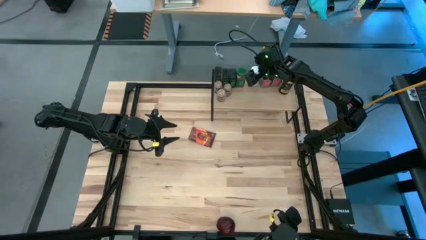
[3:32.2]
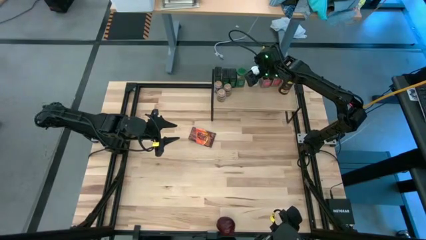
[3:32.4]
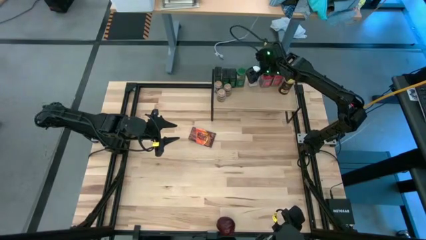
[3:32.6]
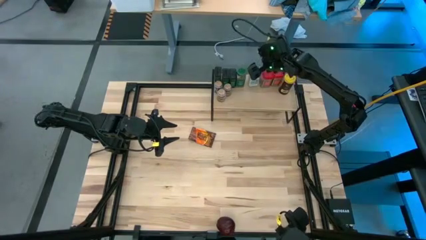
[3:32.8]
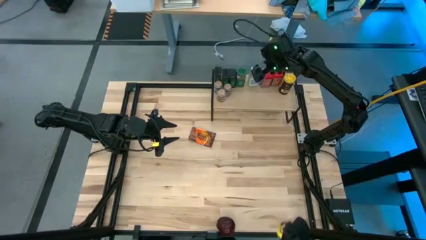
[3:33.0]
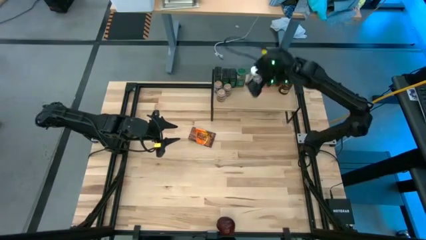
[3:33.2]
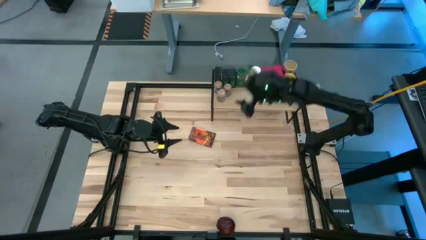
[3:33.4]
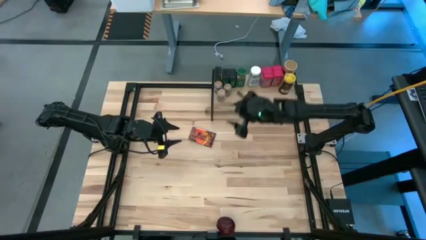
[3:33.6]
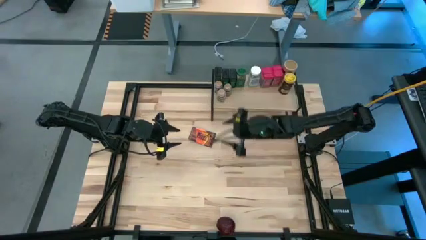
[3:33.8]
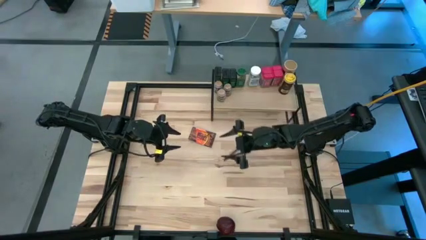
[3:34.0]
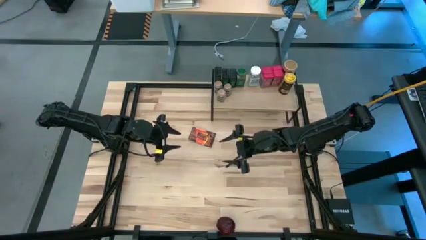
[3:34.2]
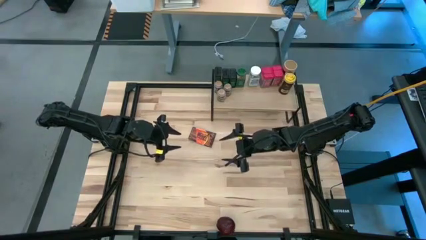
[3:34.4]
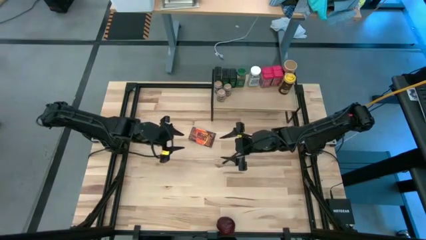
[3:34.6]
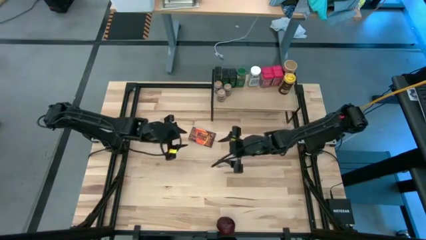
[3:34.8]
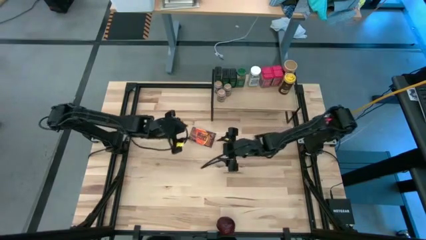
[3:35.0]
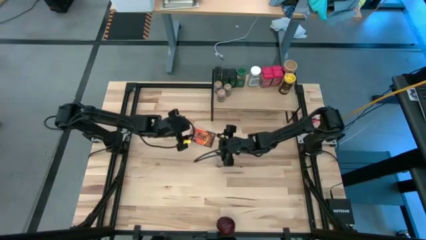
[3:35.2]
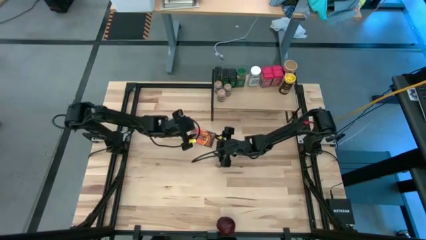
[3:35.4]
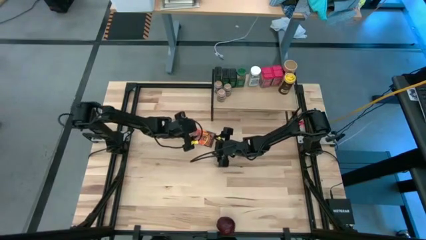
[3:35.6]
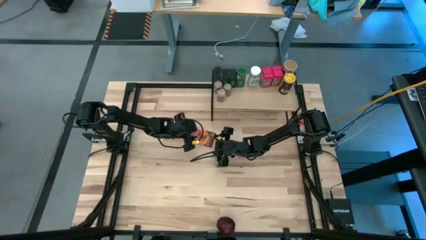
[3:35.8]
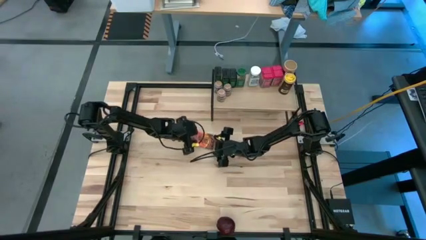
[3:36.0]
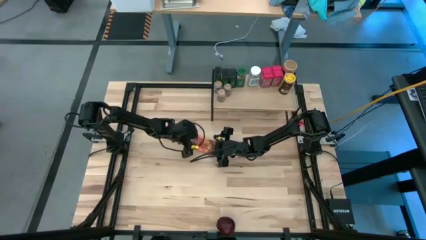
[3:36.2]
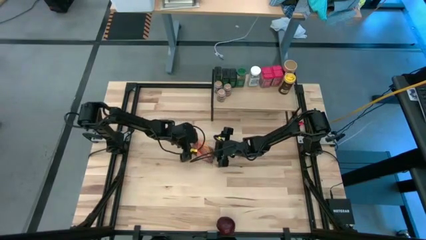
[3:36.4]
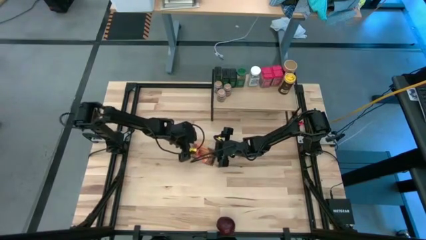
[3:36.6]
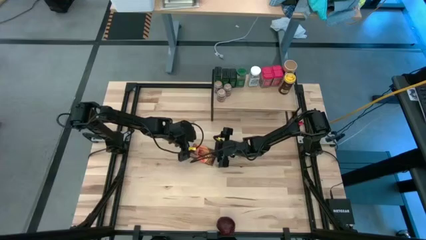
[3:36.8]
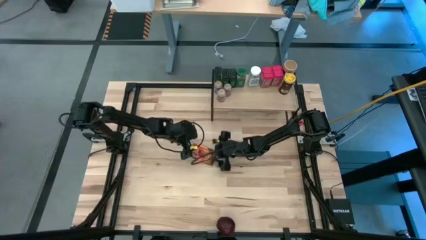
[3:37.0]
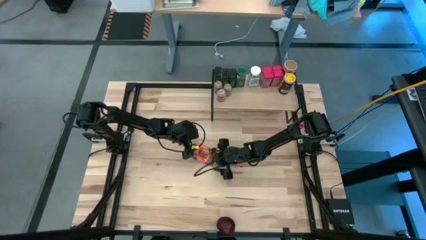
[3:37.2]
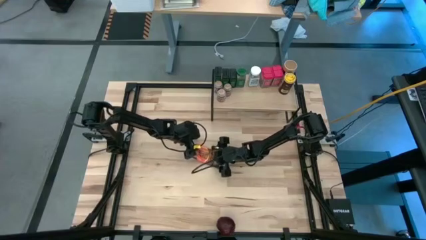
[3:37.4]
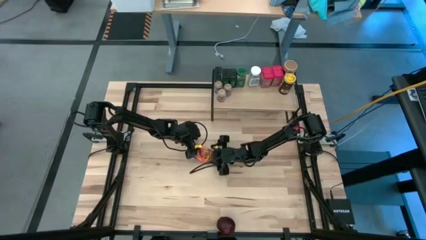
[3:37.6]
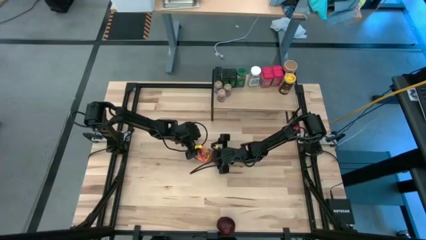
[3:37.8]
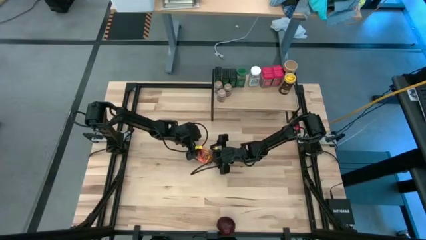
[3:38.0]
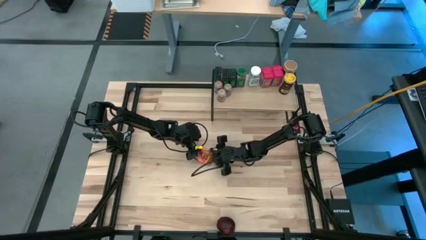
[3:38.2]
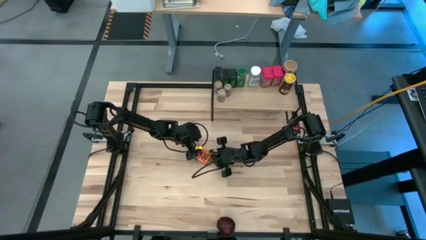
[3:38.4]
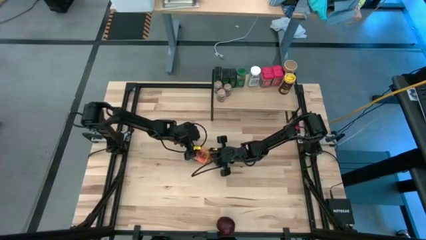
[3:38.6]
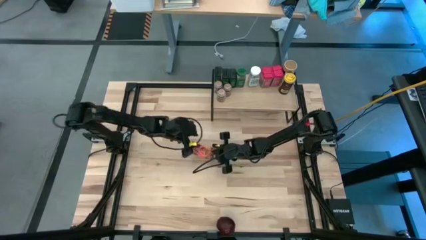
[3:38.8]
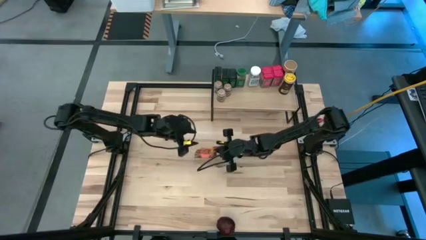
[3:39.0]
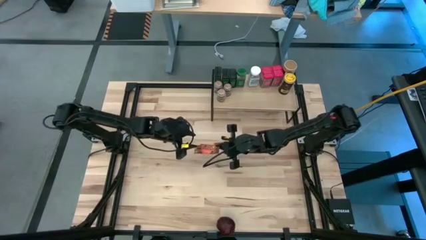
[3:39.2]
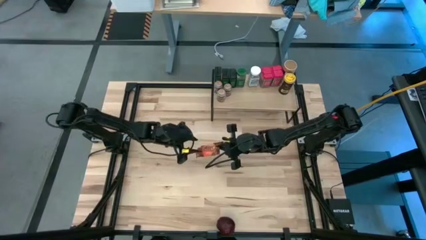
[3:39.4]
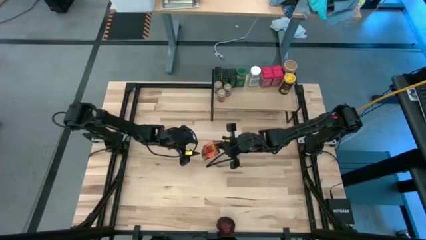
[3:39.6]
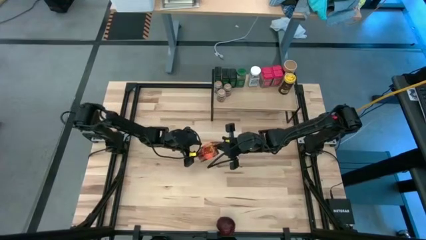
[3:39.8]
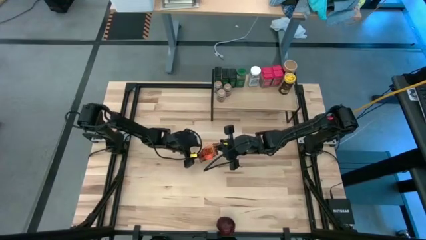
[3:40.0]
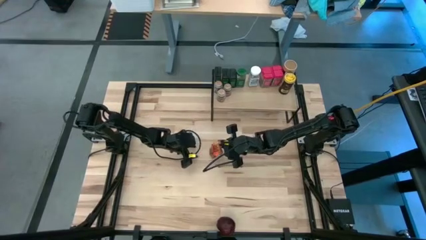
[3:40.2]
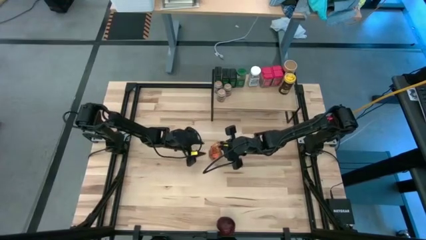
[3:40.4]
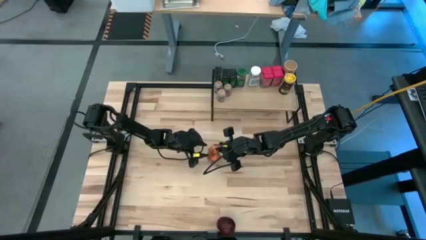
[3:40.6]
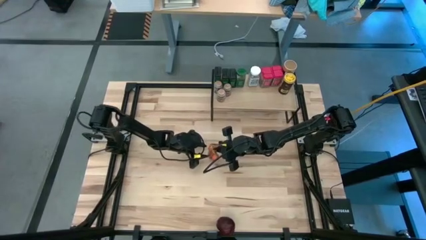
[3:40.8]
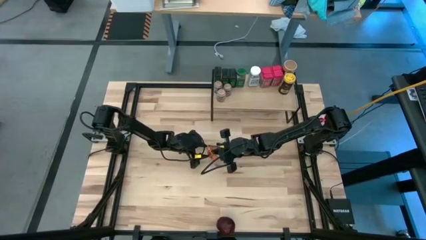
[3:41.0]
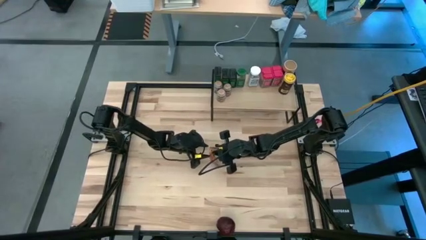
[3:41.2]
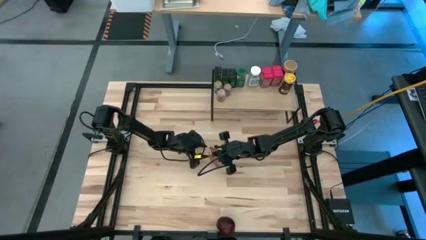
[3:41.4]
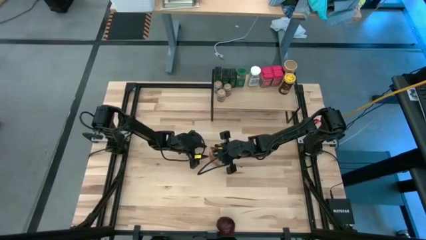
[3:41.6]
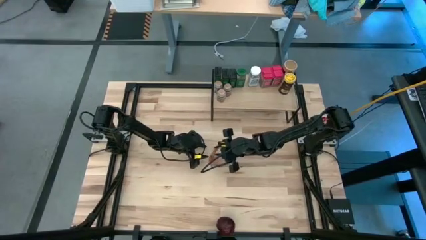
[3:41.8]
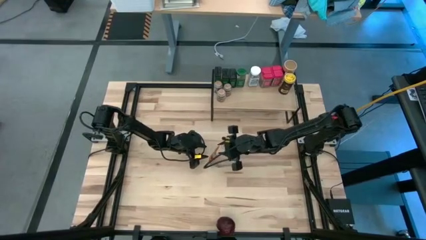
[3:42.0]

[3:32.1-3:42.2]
Task: Shelf spices
Put the brown seasoning pack on the shelf

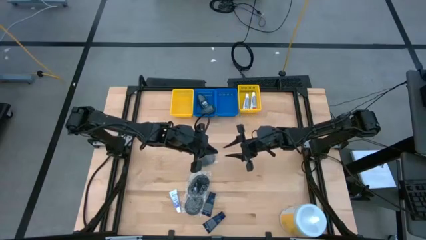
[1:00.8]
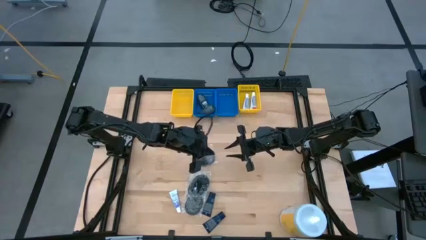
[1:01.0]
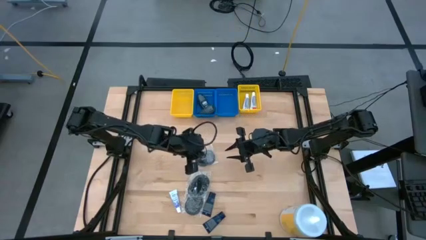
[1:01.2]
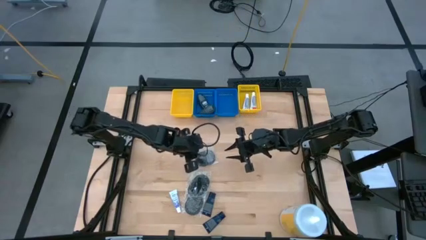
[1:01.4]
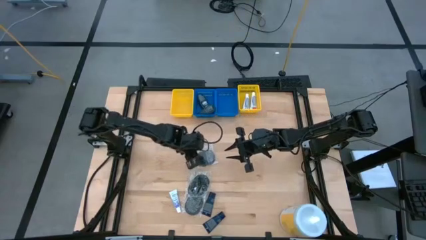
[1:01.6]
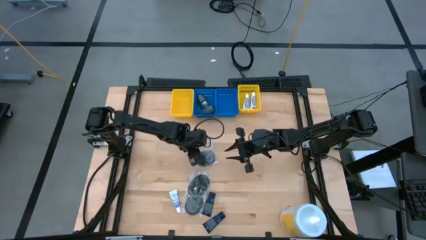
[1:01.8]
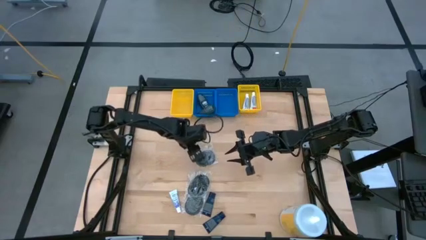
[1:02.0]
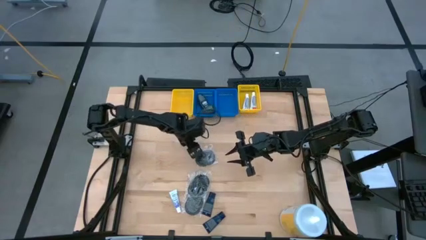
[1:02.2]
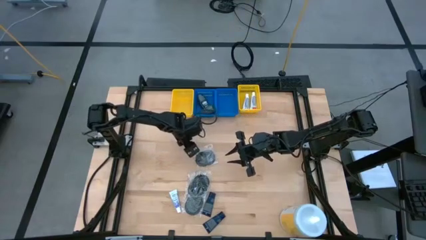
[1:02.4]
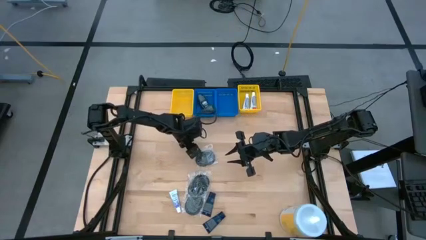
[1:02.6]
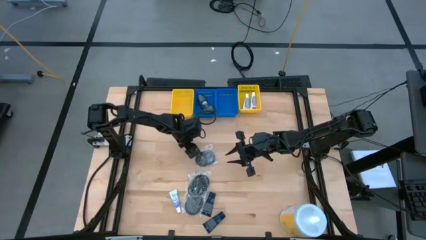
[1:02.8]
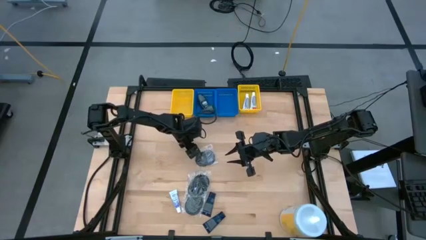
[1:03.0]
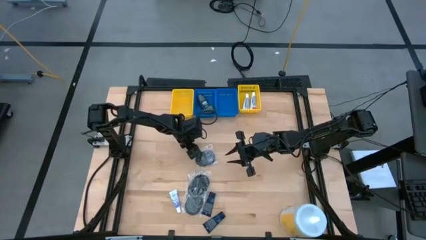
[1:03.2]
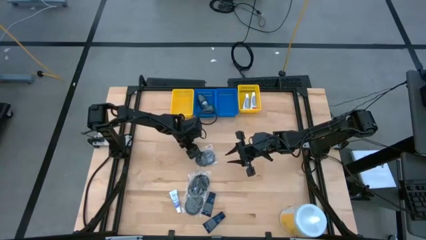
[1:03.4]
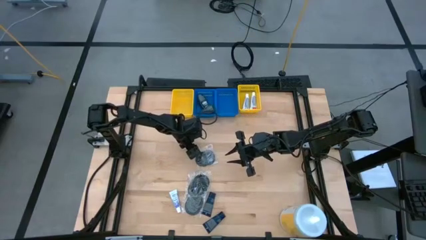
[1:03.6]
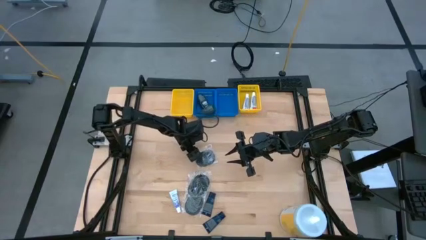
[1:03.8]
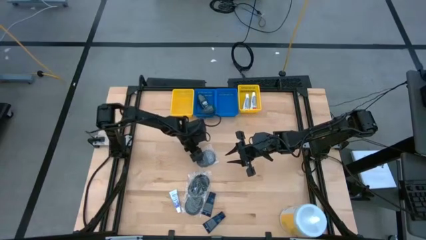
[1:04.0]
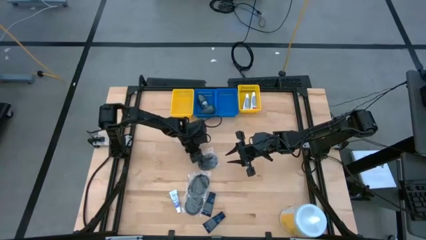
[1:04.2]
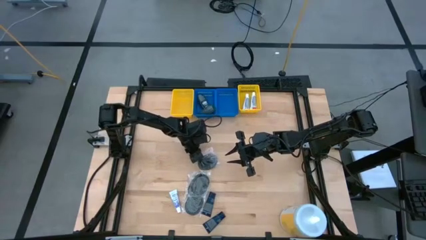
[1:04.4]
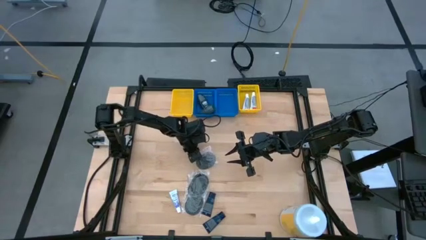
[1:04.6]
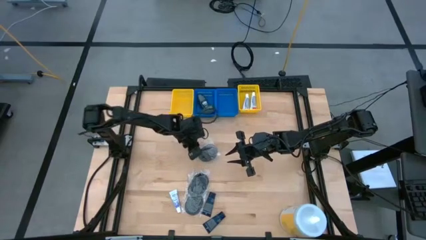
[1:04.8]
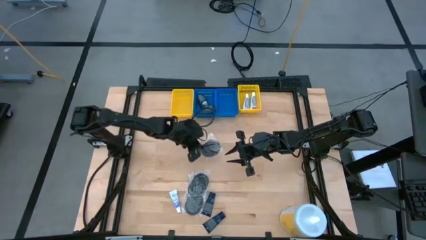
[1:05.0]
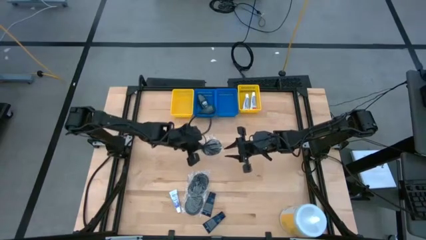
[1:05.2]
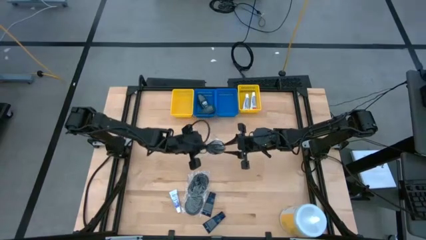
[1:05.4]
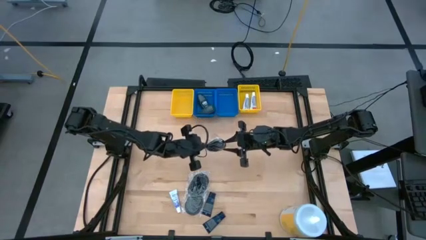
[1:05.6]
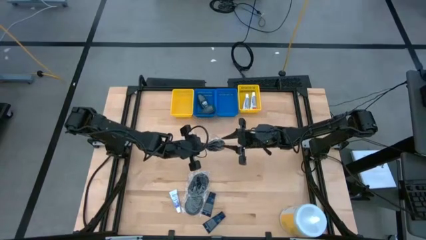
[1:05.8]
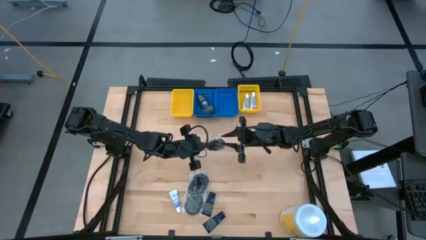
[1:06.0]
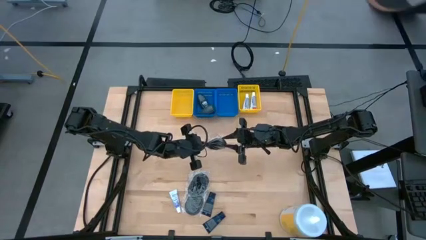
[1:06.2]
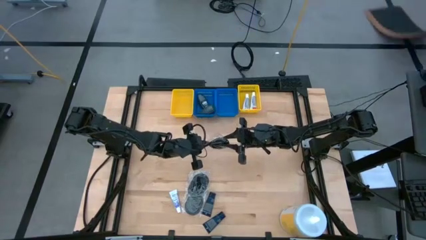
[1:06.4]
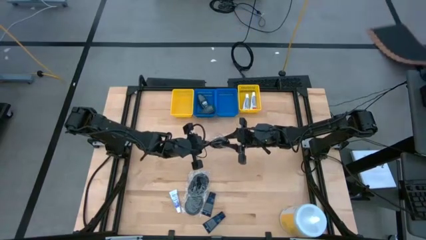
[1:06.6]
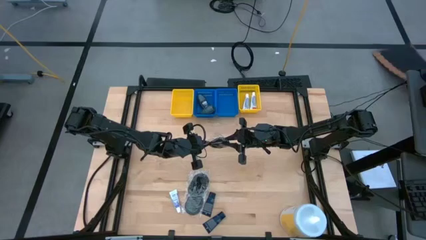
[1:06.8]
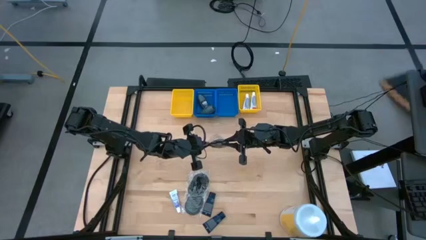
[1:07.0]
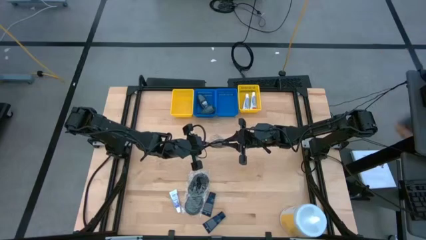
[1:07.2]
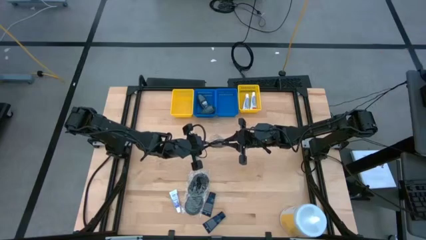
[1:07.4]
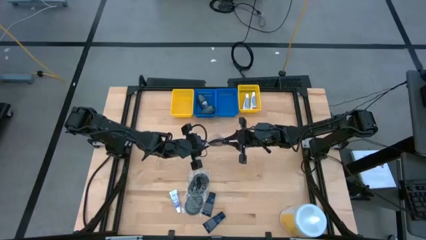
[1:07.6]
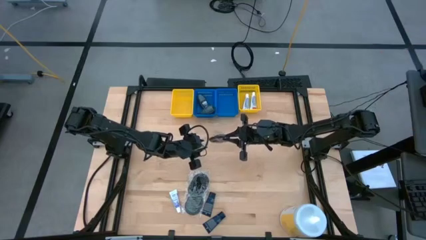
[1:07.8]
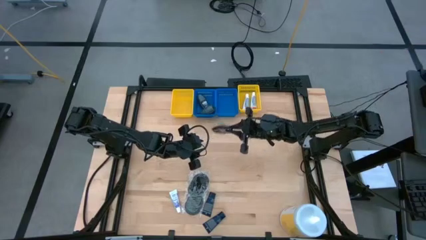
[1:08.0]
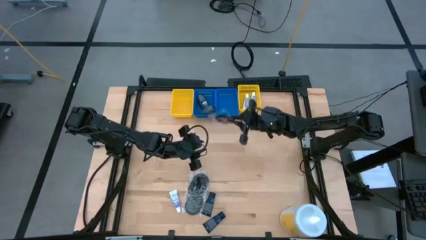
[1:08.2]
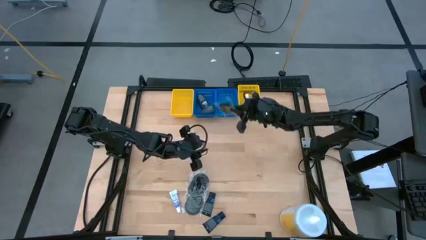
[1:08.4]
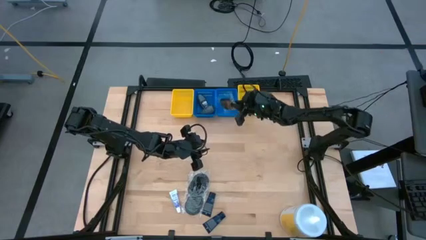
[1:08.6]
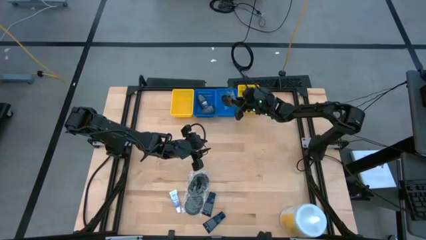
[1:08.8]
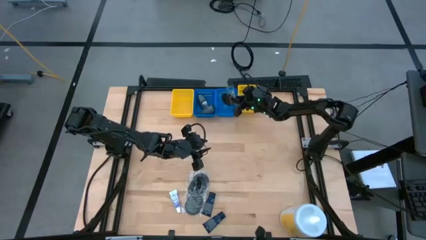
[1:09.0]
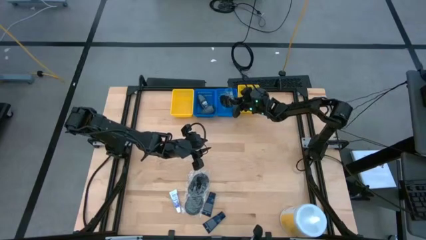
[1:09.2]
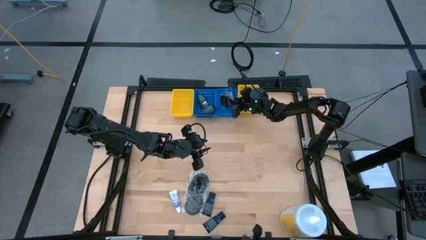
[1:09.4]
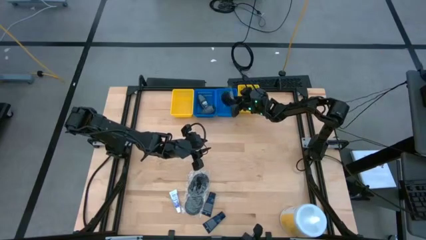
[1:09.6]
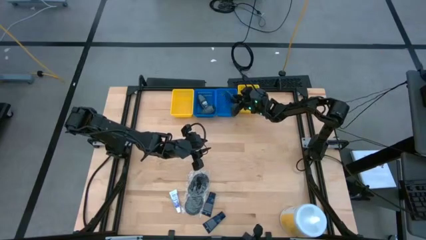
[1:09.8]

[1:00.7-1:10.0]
Task: Pick & Place Travel size toiletries
Put the black hairbrush into the right blue bin
